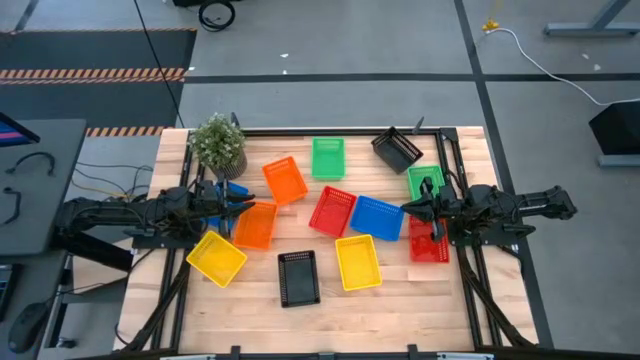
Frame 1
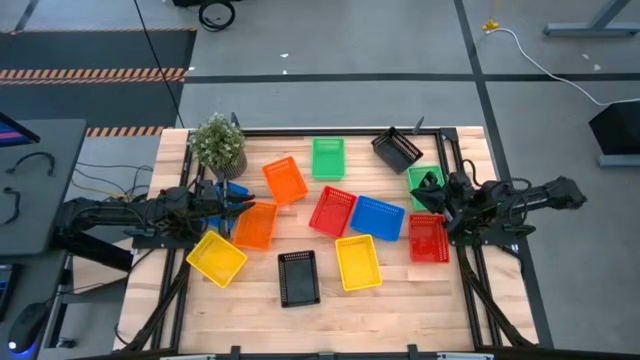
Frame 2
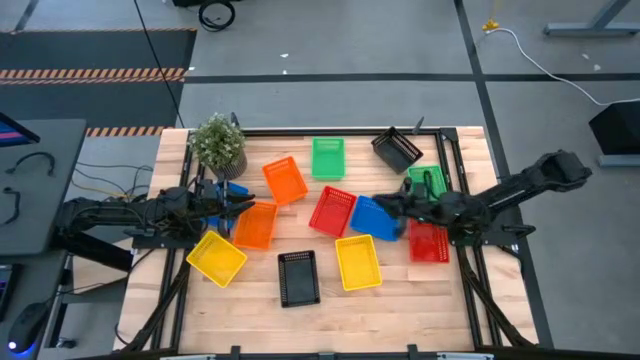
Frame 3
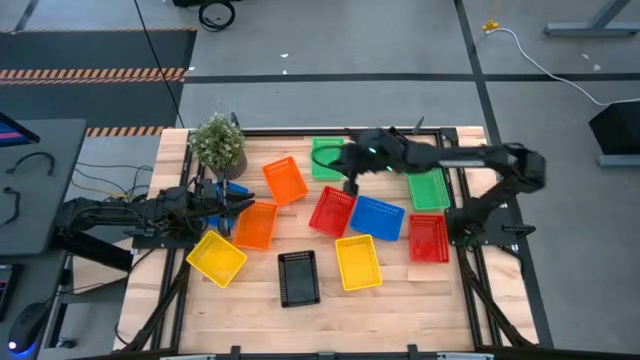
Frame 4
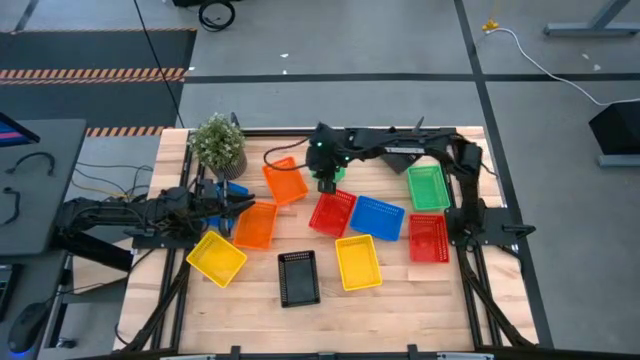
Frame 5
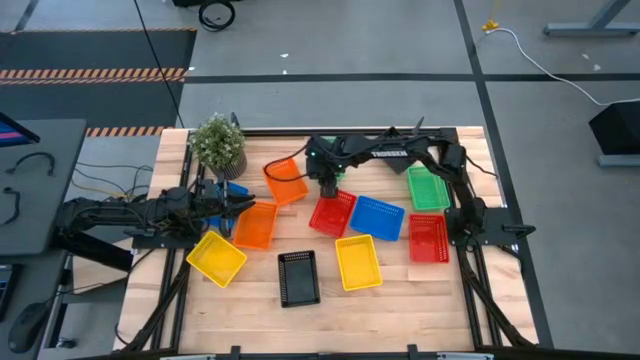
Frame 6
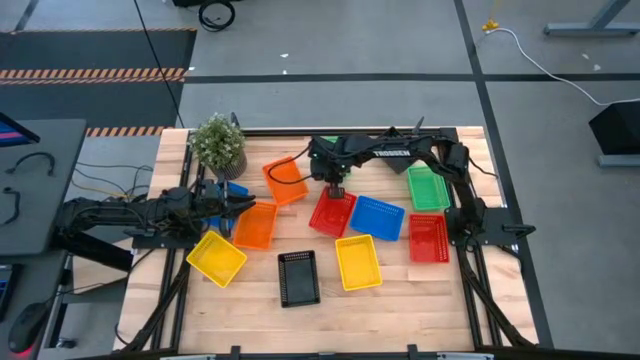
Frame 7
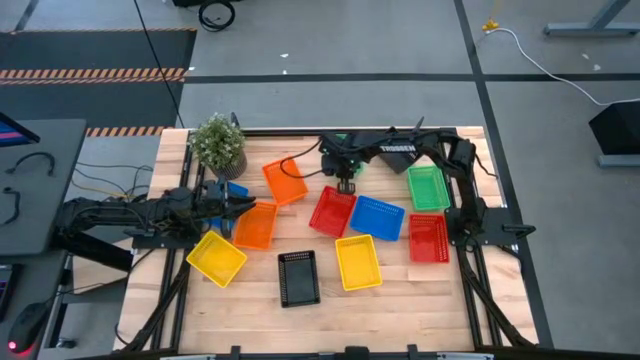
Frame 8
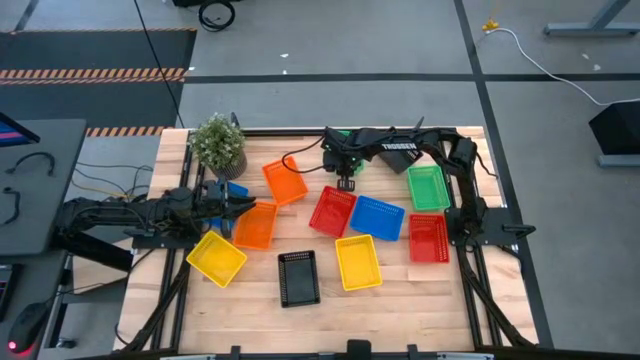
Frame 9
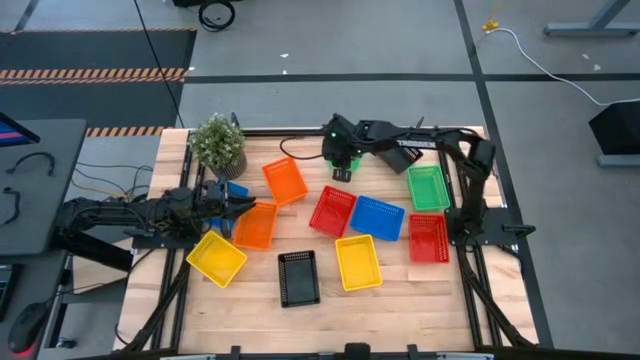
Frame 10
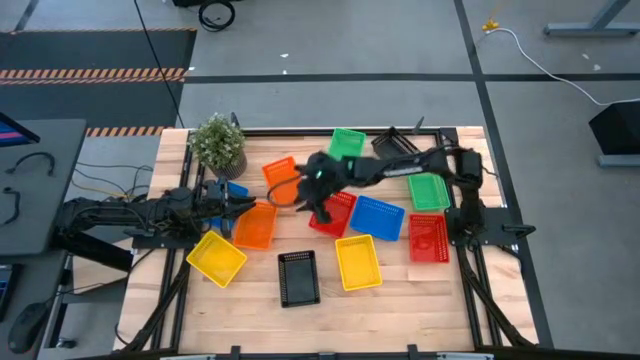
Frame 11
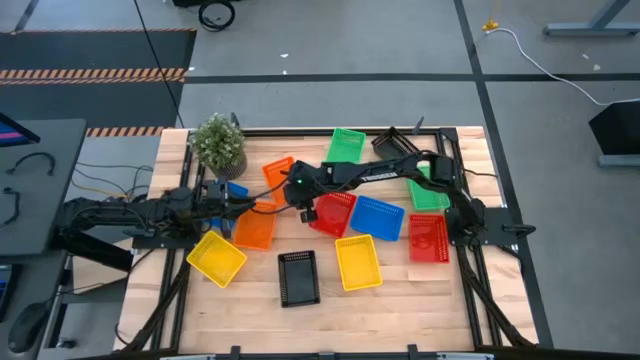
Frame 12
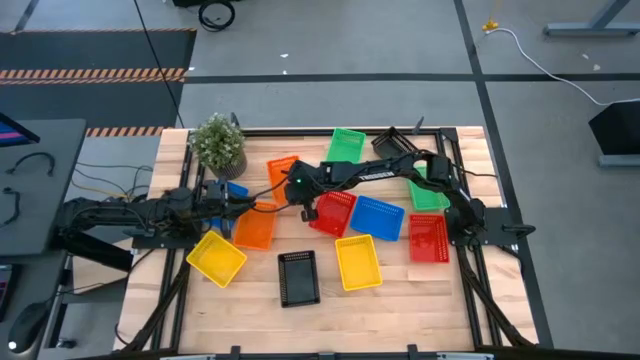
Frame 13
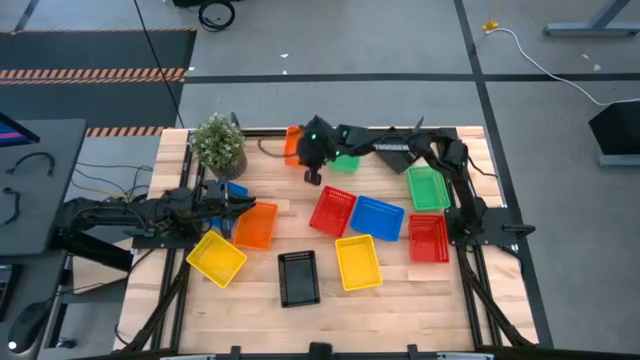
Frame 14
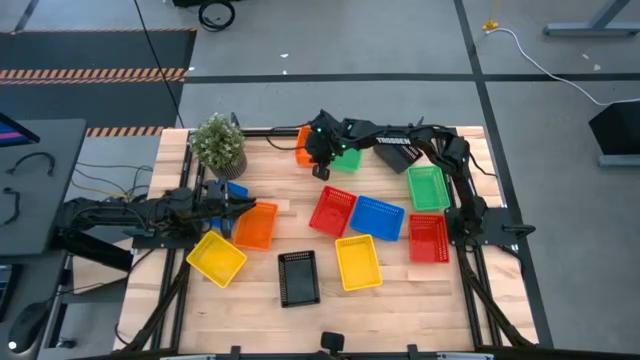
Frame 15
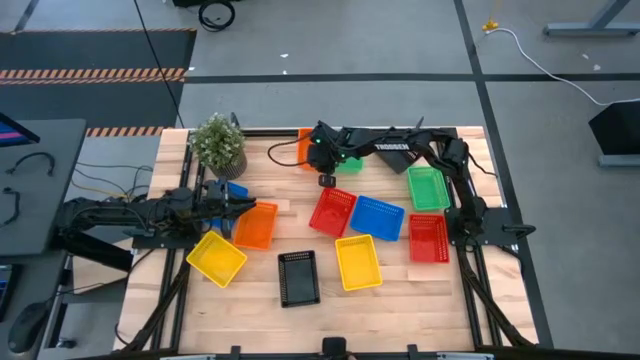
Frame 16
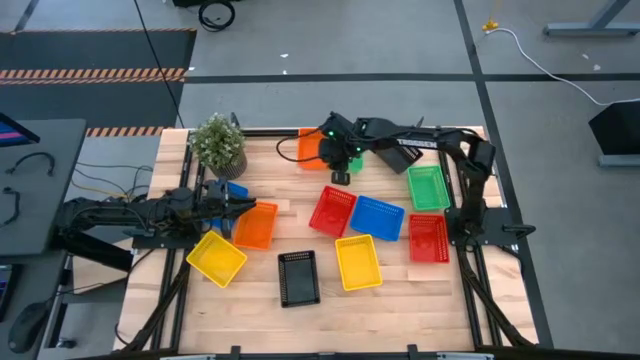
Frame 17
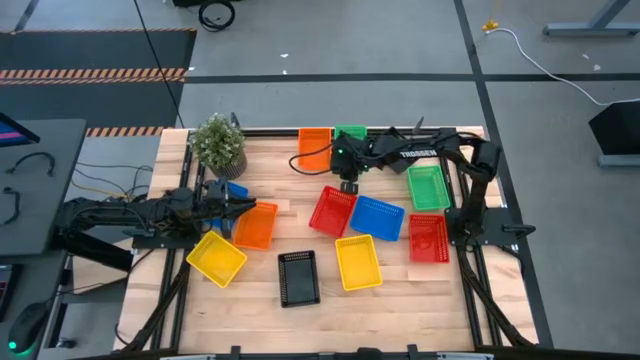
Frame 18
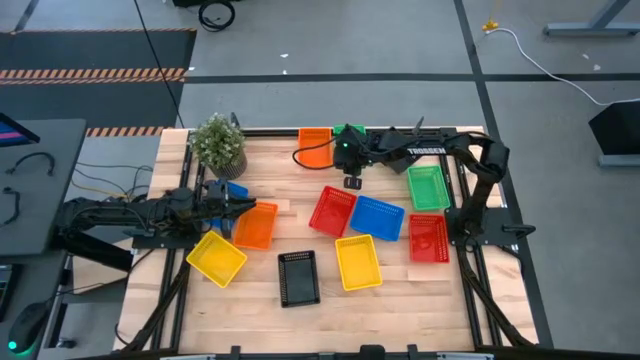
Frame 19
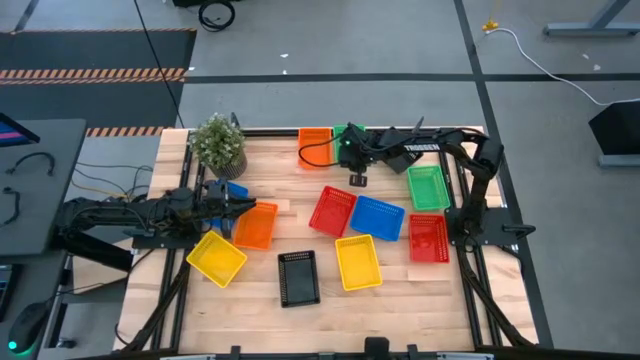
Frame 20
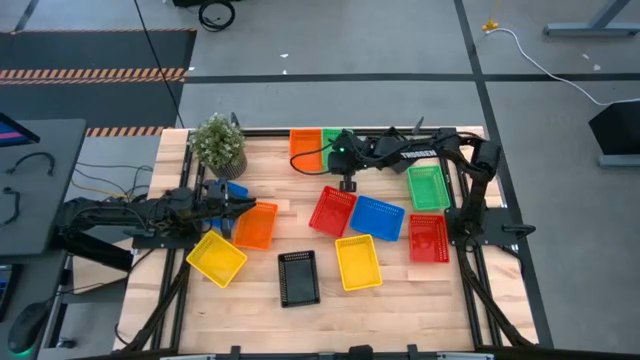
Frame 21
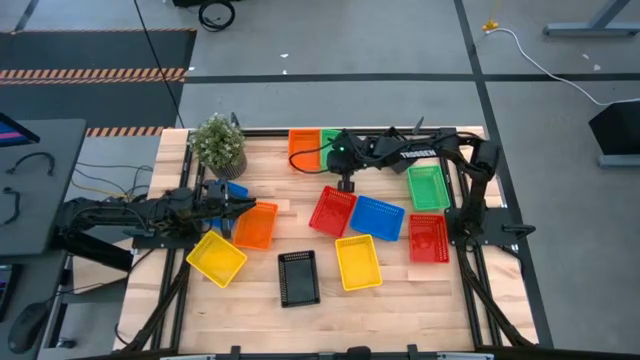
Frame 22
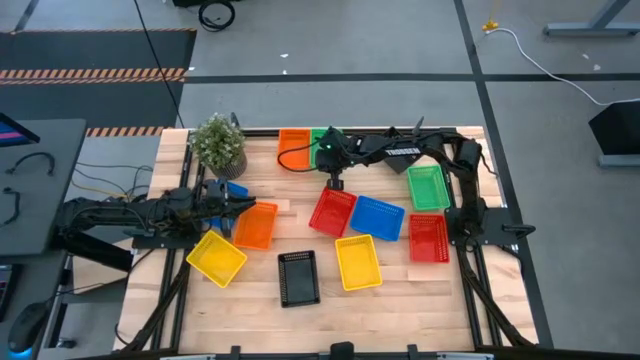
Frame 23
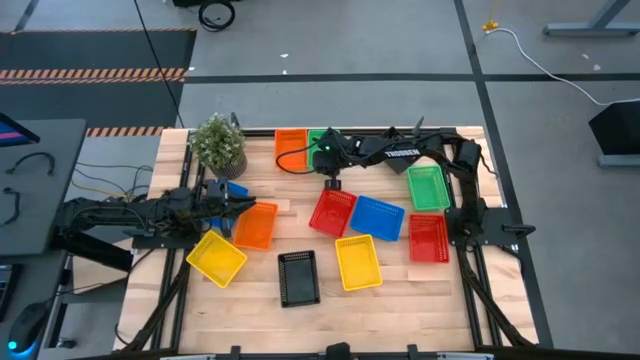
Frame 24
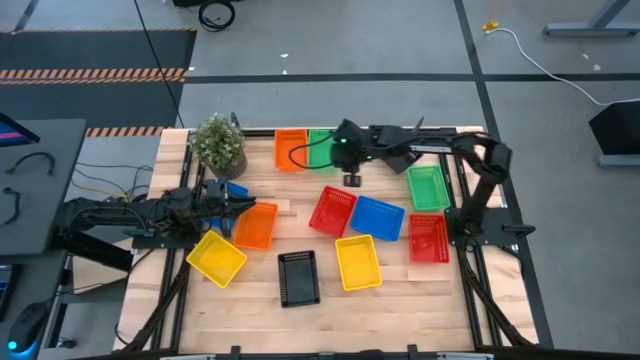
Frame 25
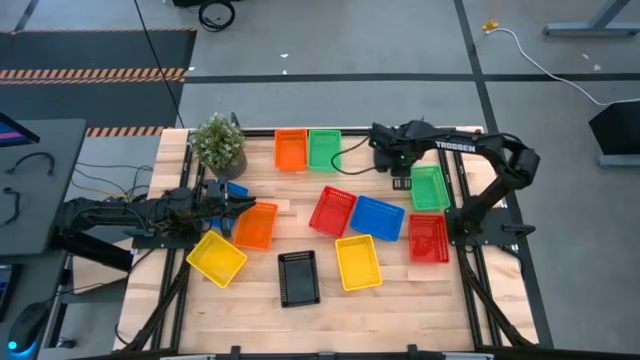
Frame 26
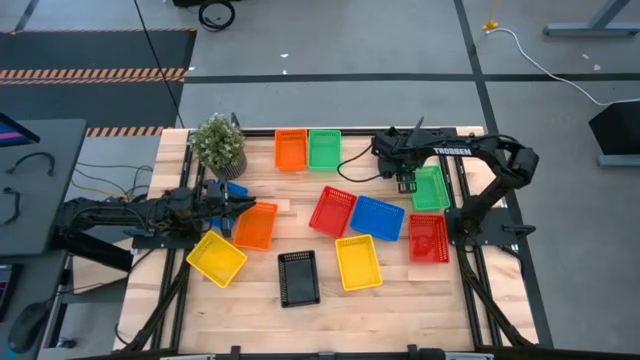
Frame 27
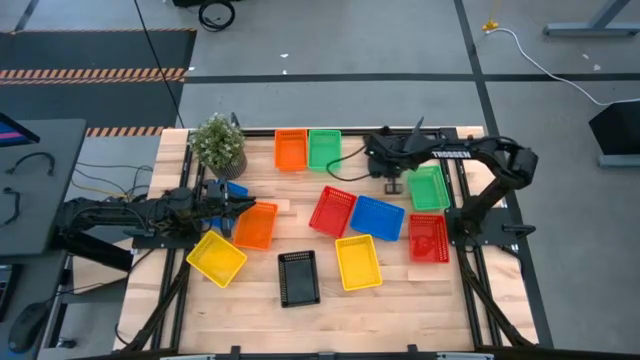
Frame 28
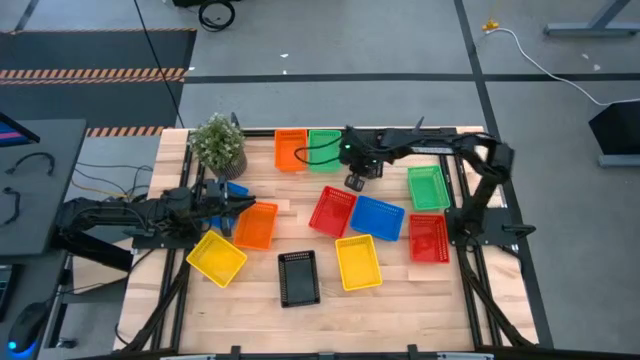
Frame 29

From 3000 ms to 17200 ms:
Prepare the bins on the table
